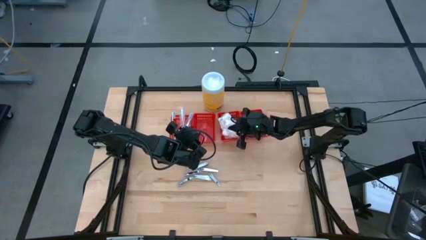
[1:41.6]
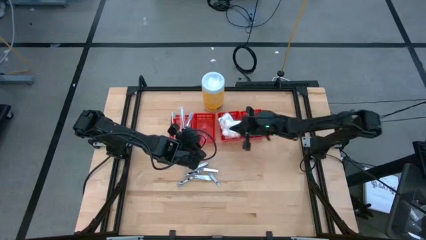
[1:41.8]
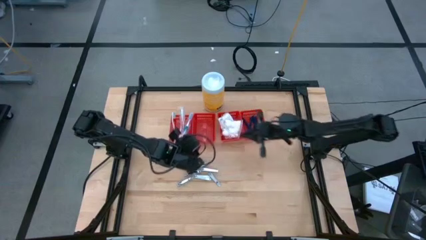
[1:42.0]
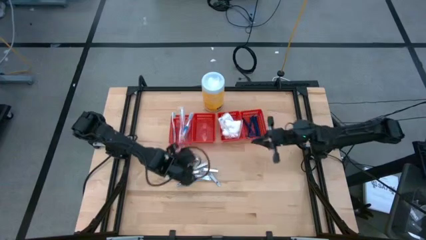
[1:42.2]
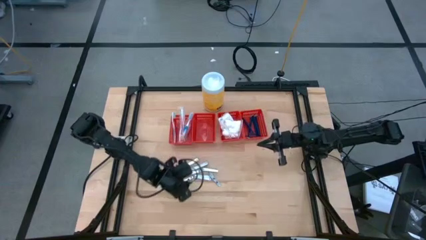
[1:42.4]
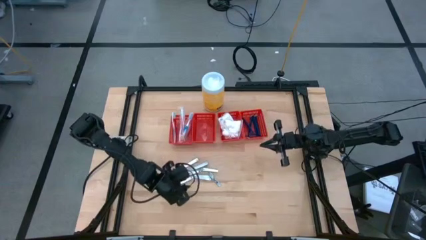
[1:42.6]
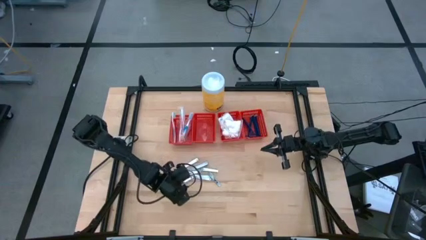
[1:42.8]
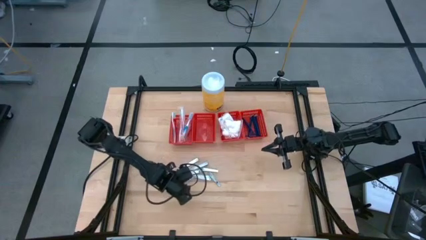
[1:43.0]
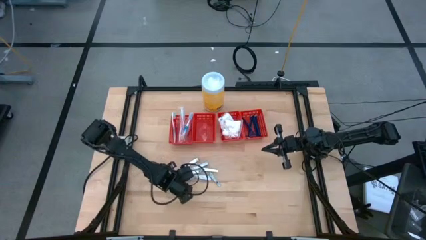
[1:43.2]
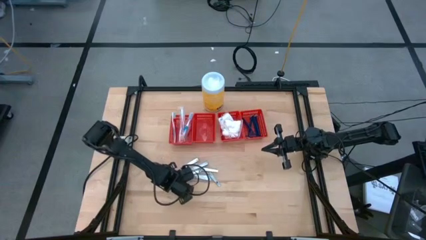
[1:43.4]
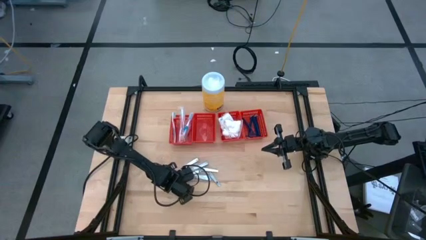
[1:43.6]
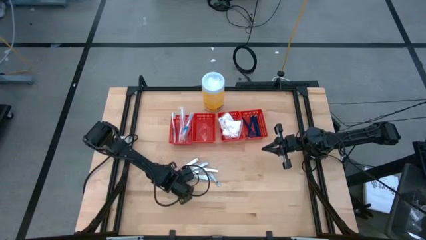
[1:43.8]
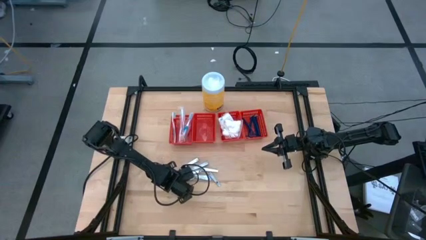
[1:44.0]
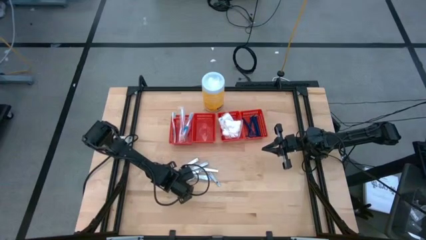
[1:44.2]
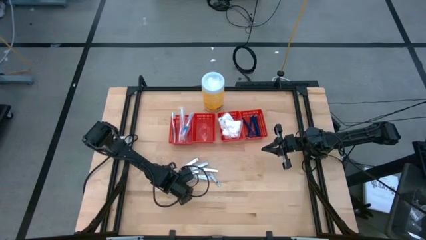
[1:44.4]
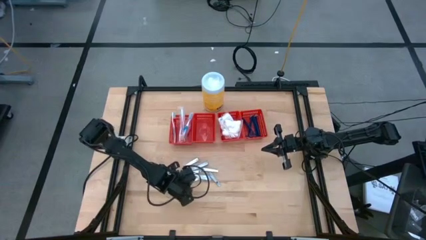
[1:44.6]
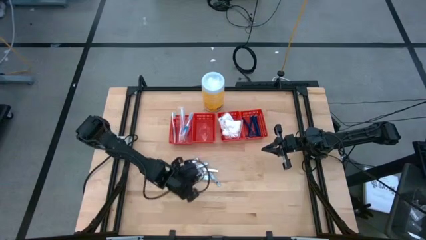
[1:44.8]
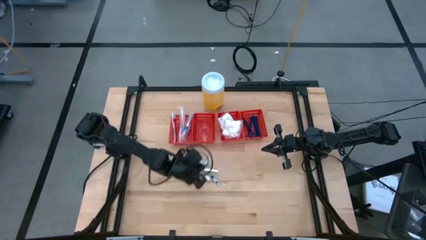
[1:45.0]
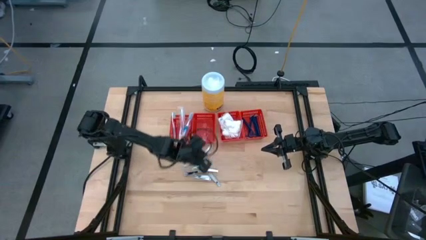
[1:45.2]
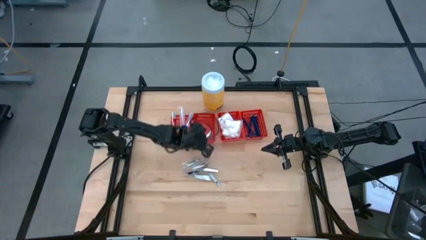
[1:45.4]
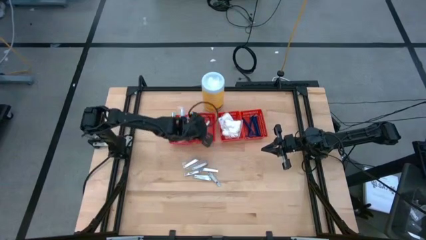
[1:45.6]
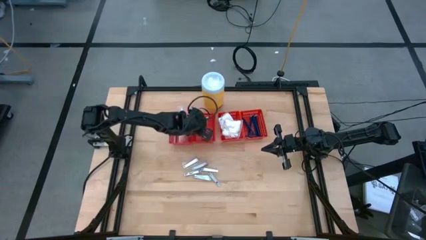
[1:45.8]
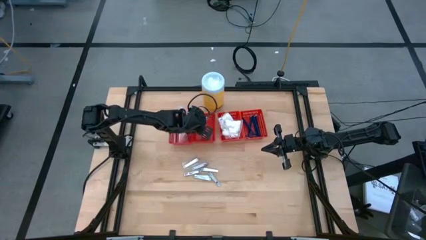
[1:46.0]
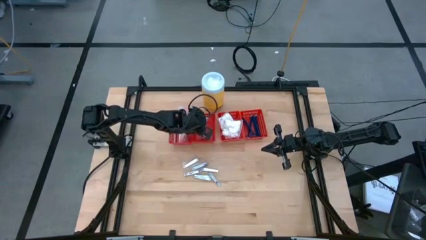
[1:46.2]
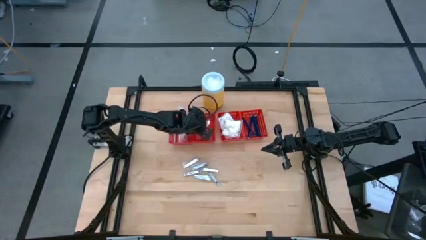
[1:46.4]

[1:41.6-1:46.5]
Task: Pick & Place Travel size toiletries
Put the silver nail clippers into the middle left red basket

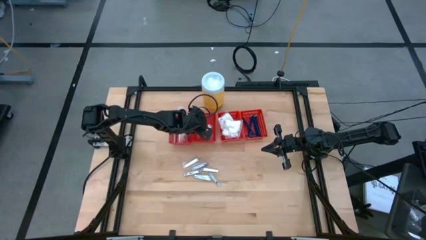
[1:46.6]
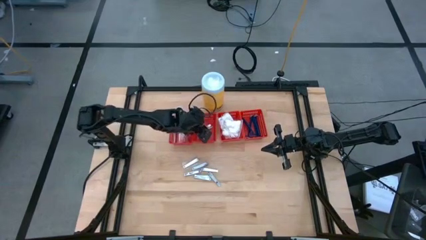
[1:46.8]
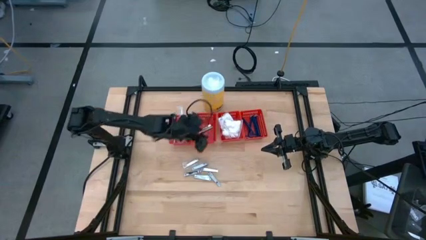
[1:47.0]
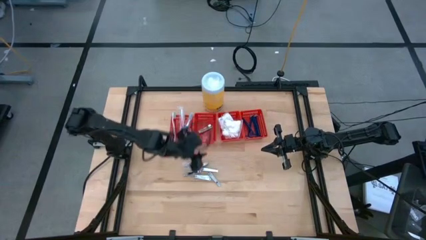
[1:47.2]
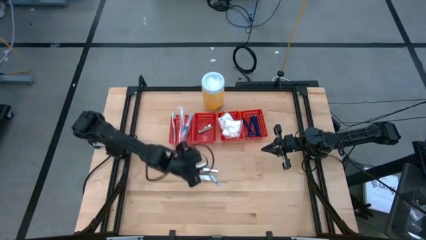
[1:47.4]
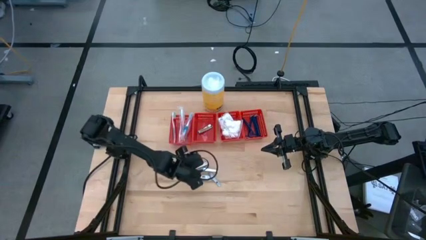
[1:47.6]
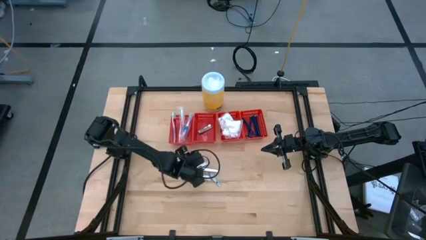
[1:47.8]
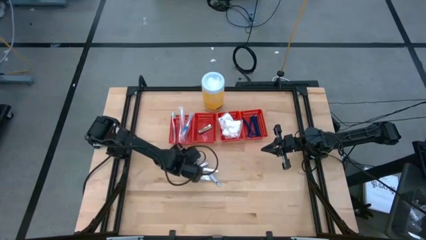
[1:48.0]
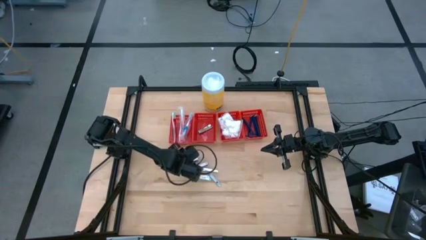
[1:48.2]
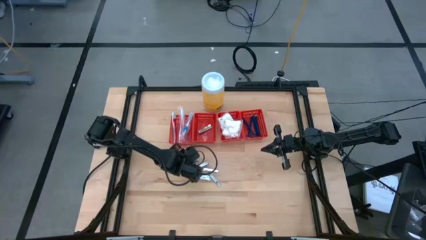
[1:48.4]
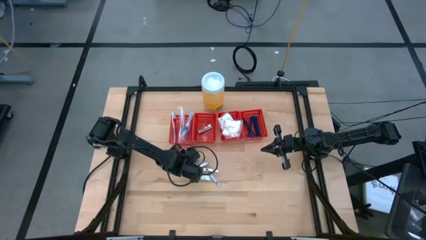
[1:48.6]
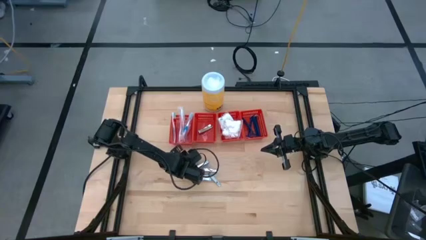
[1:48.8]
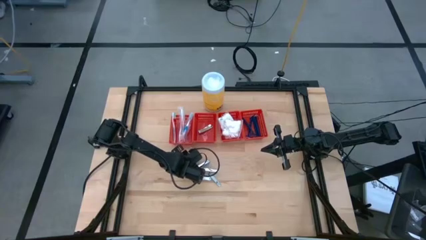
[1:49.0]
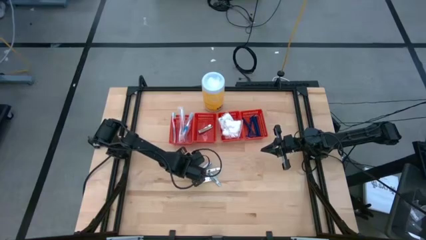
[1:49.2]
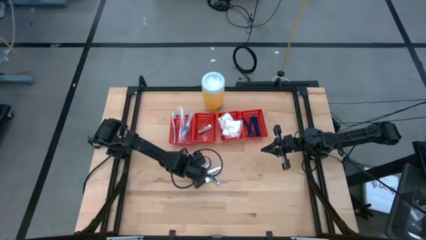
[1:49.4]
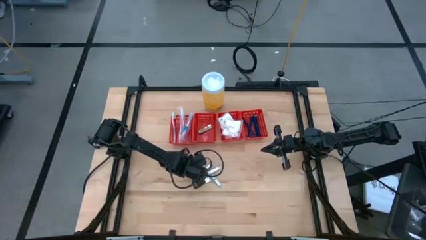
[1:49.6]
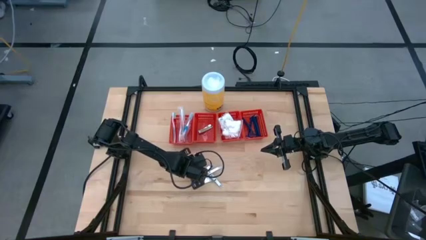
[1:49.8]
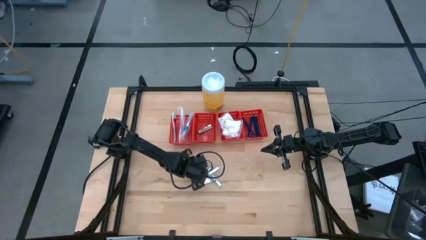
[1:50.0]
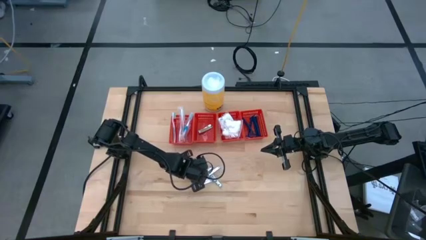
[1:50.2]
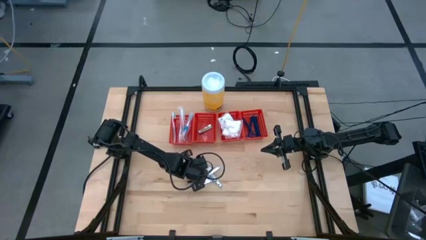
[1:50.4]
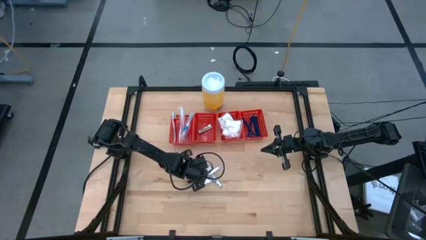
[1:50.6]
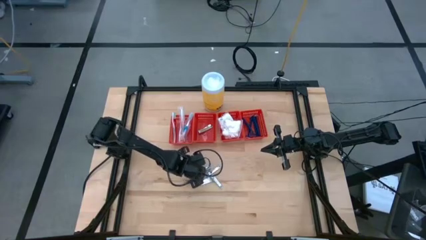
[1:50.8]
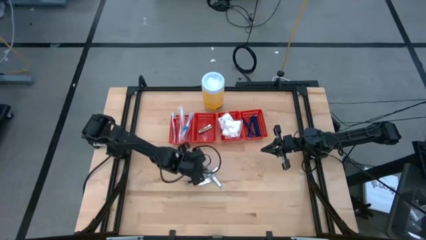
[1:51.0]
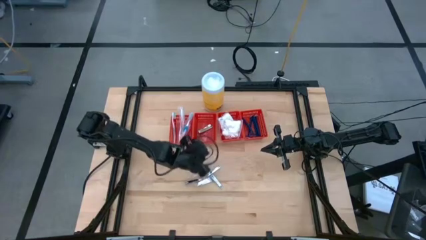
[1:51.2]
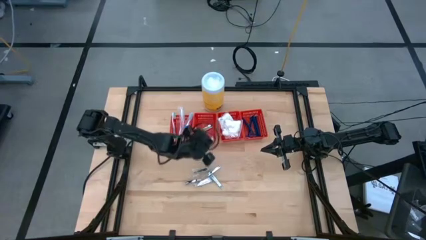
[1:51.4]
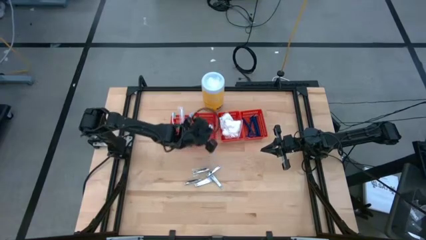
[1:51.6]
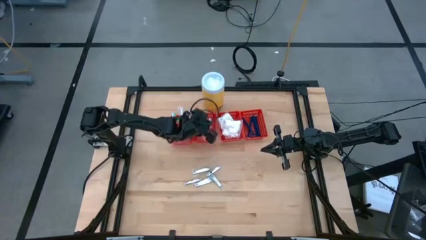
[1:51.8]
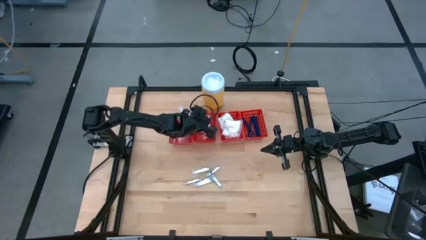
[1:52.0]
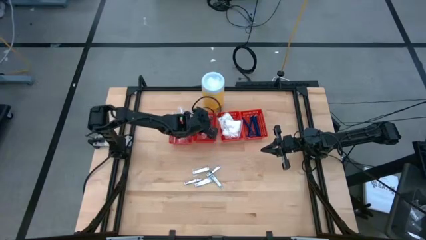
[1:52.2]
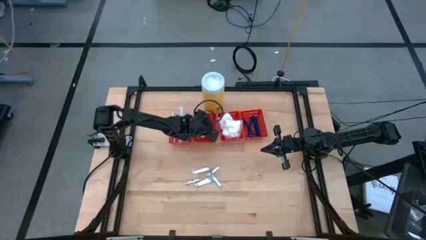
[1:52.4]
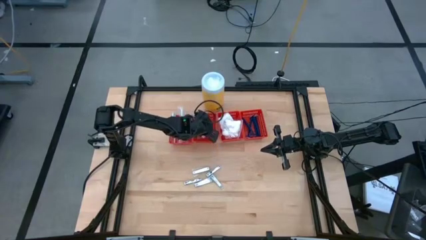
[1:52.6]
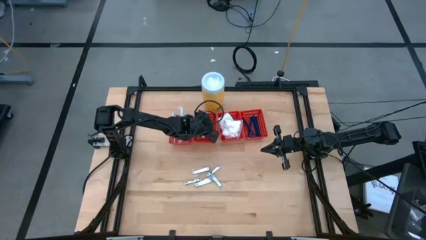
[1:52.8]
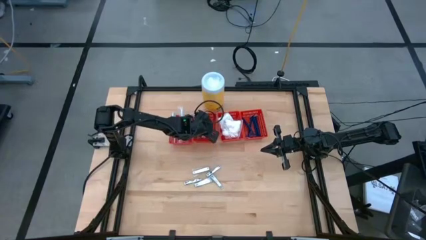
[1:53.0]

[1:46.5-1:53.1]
Put the silver nail clippers into the middle left red basket
